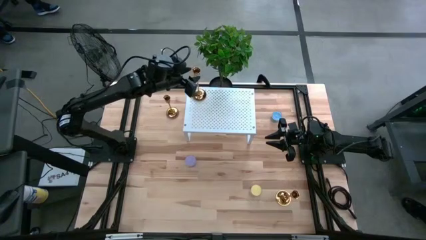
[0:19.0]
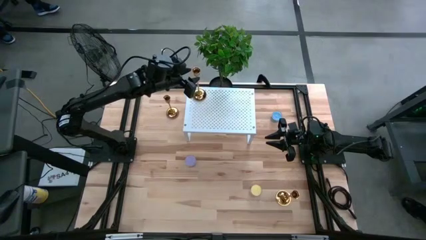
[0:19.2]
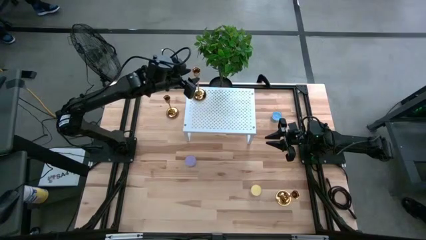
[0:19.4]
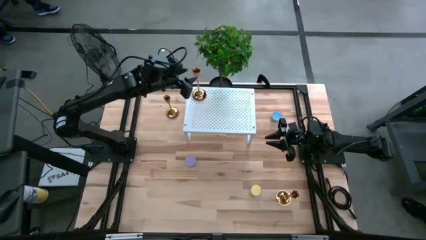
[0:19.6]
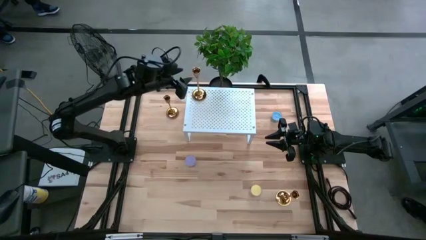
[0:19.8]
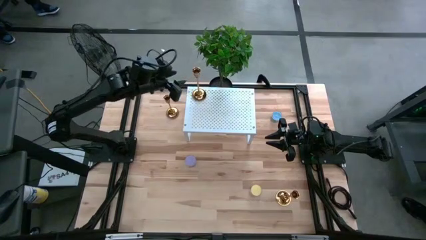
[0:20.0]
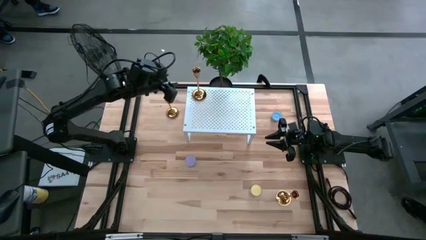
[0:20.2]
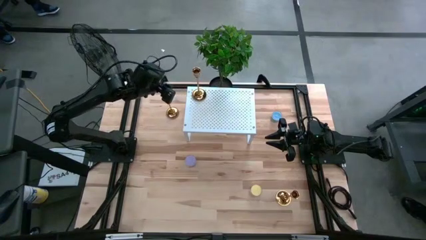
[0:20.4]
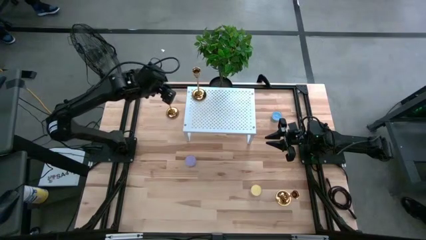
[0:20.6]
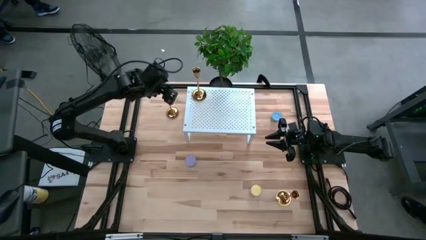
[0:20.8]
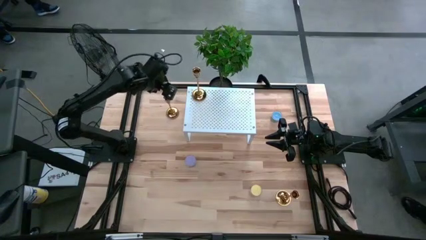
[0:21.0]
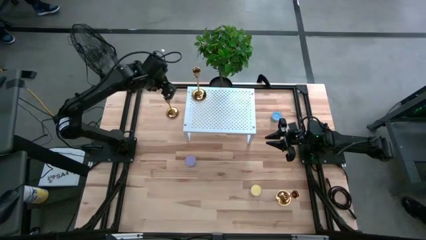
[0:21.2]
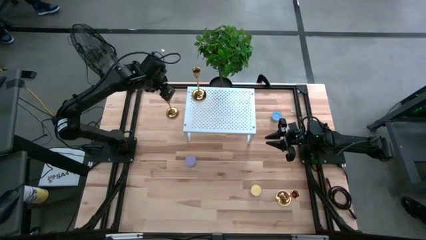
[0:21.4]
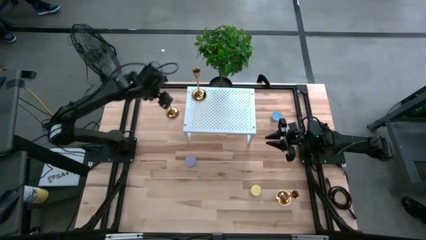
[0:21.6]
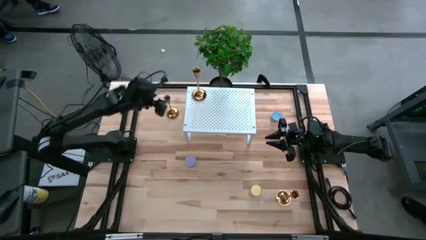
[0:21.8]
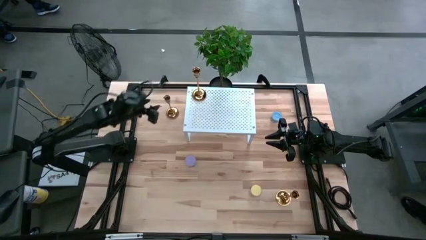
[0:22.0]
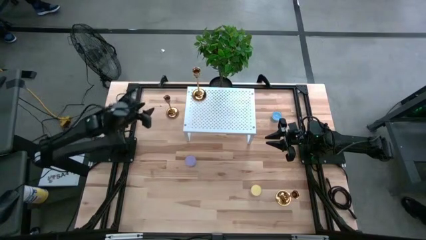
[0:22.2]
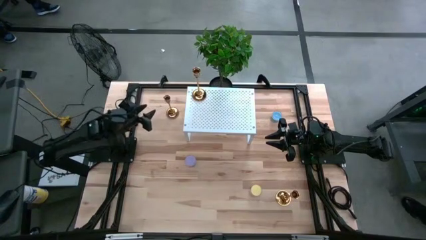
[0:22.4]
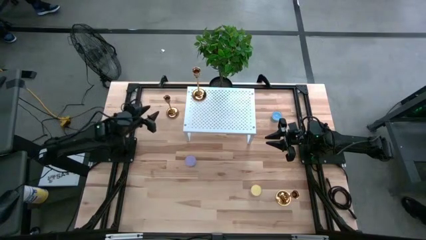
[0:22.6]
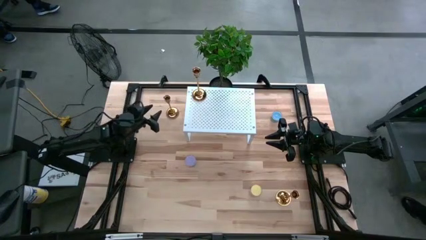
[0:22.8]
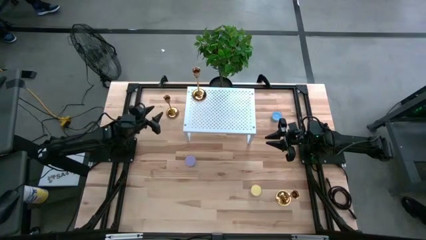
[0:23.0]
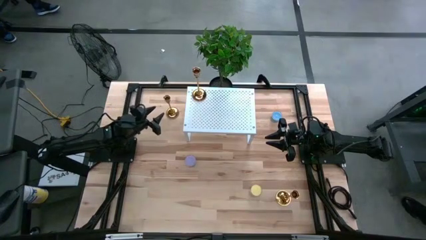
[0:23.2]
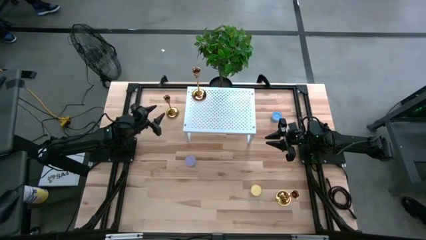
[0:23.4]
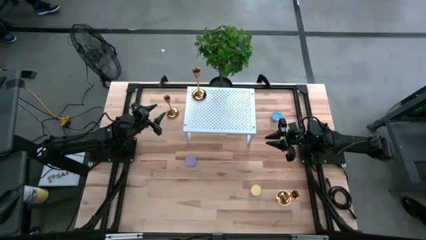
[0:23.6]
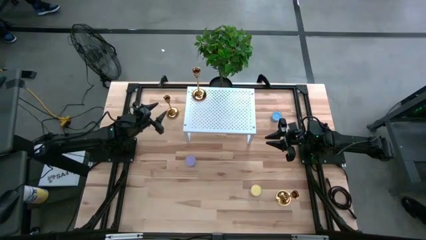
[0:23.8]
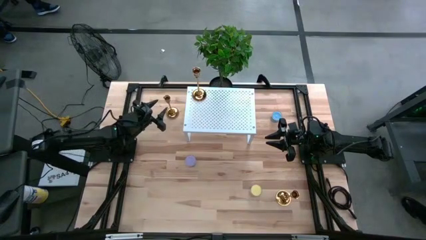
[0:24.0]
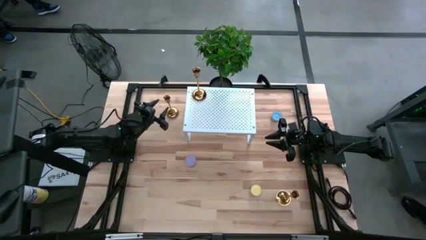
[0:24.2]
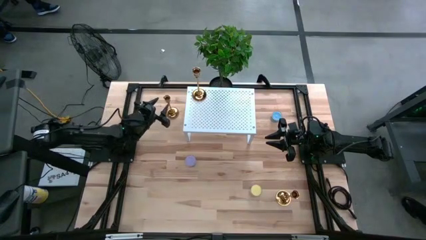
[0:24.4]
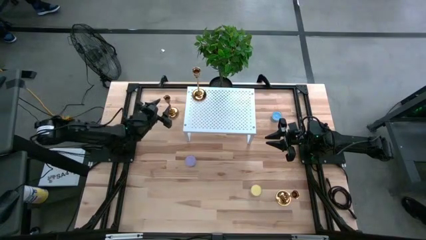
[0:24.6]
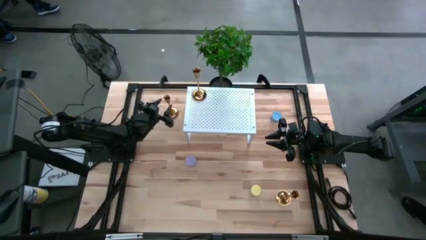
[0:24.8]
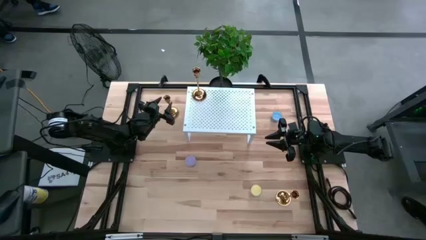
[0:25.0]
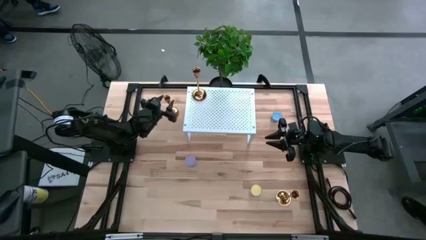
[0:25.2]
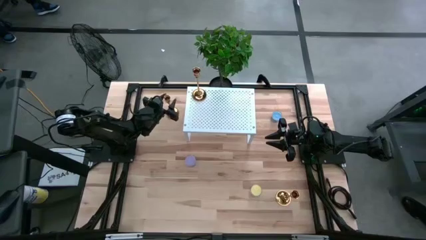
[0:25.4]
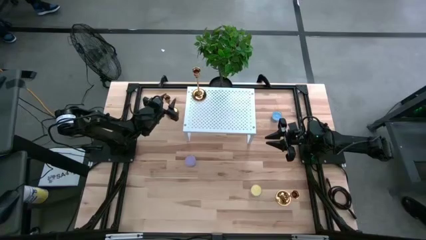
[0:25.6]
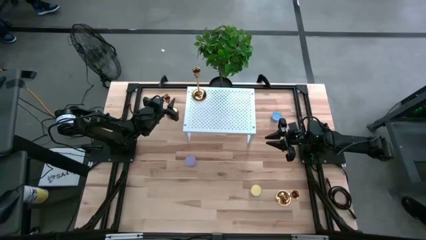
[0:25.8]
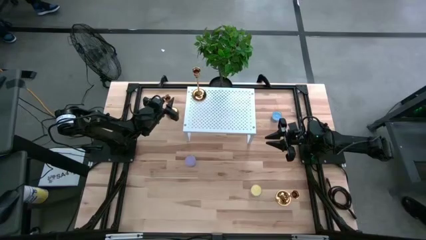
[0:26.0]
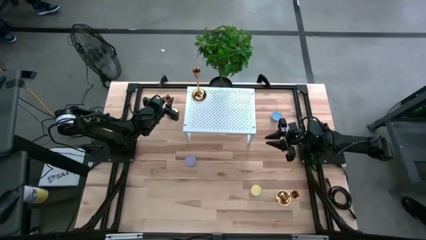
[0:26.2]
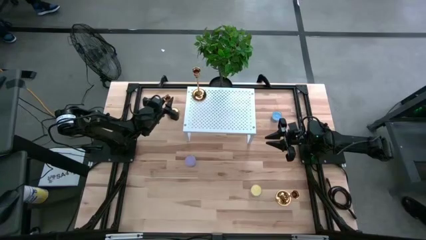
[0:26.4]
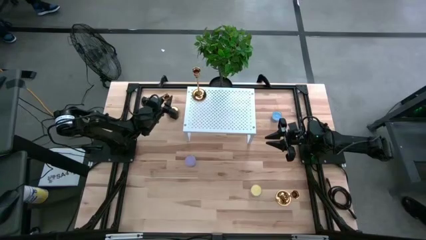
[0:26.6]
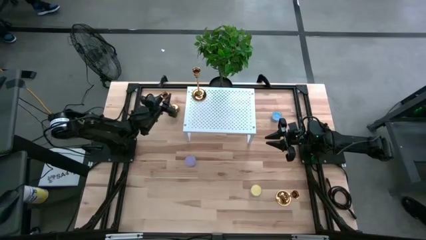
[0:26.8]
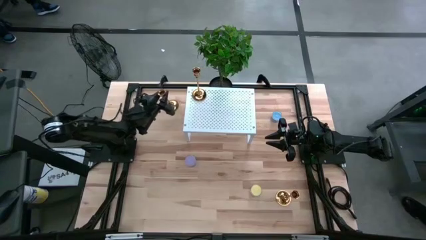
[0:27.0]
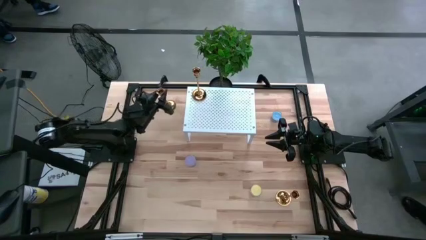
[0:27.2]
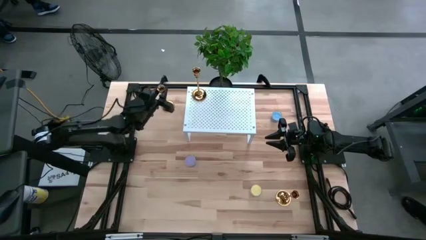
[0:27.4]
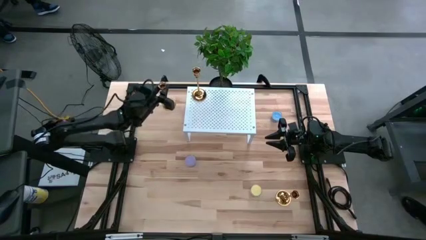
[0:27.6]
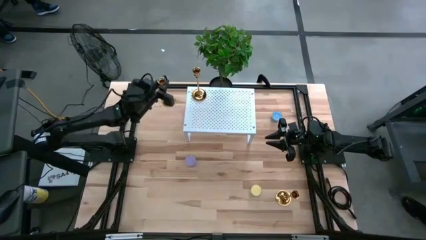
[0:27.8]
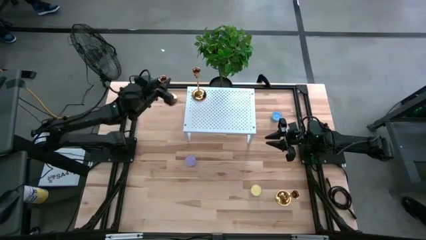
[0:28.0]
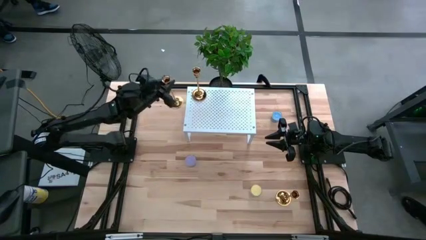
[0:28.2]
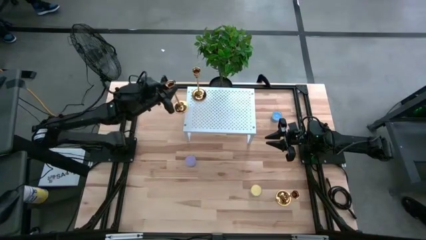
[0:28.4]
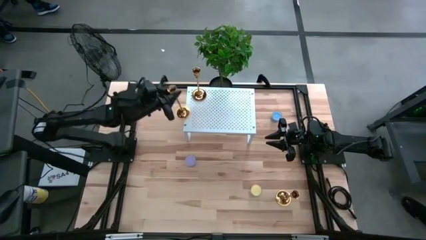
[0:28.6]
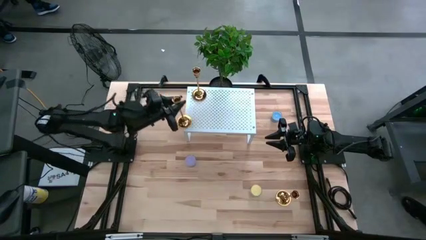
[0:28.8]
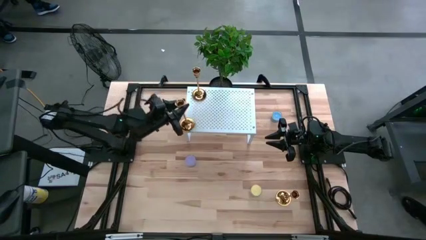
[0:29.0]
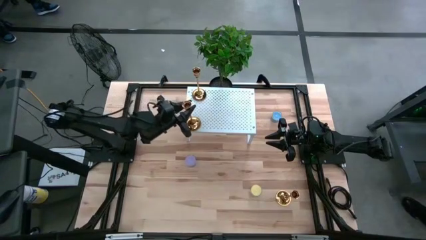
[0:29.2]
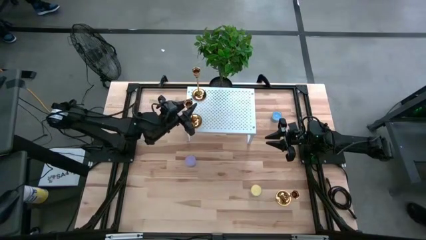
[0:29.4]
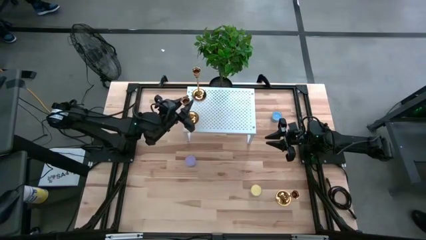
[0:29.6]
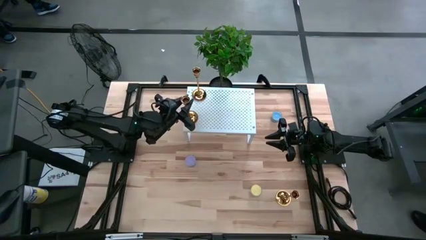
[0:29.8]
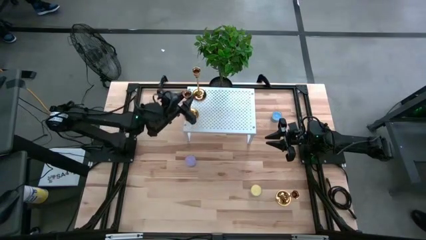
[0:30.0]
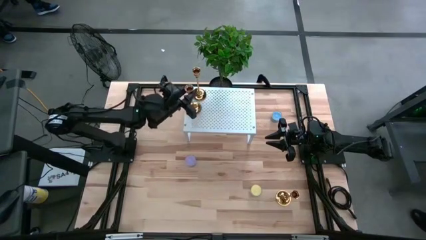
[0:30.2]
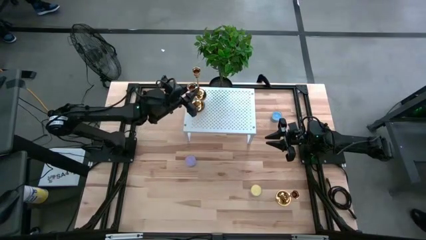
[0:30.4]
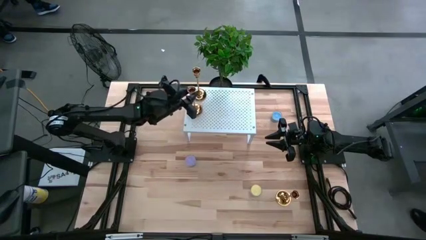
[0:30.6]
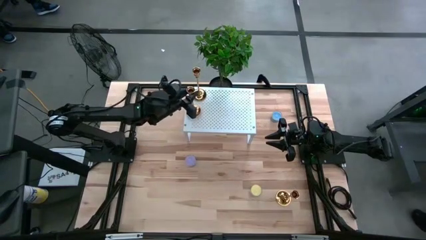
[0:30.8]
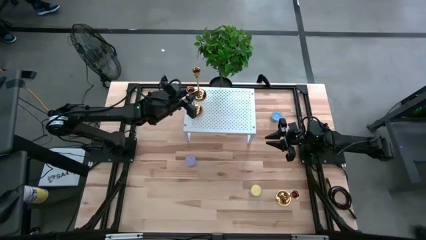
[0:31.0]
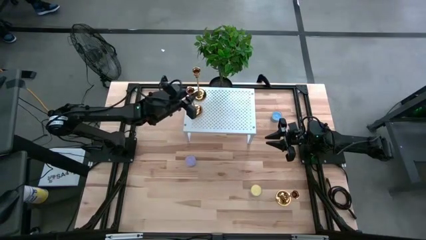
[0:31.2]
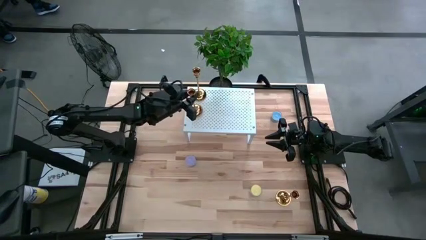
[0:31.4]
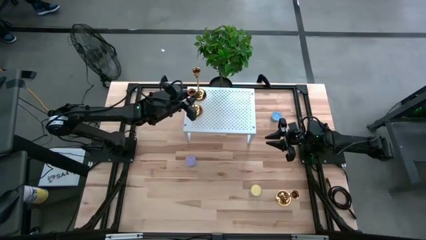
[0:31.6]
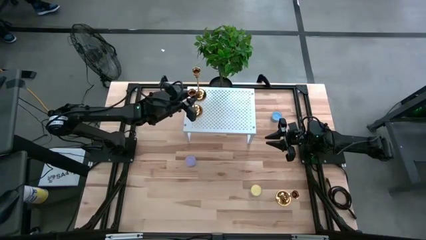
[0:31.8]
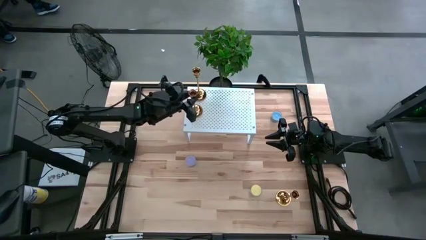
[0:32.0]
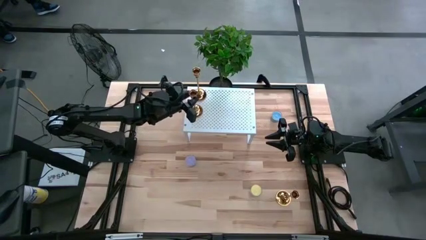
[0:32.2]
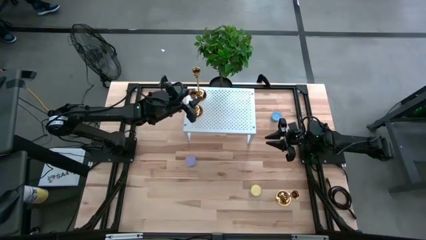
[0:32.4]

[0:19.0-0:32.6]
Task: Pick & Place candle stick holders
Put the top gold candle holder on the shelf
